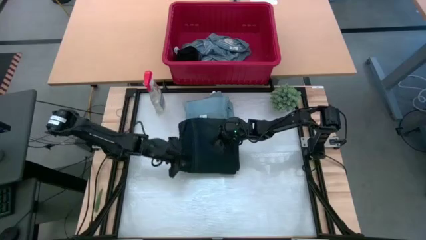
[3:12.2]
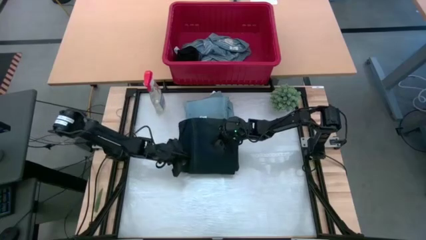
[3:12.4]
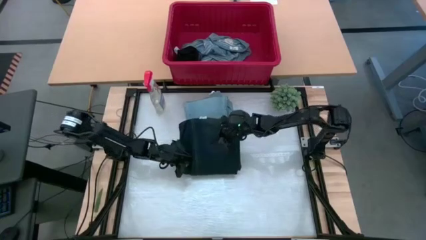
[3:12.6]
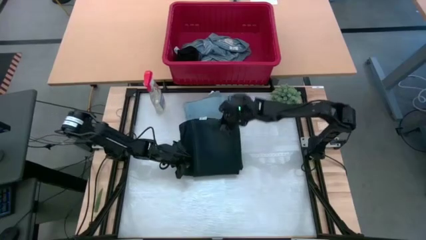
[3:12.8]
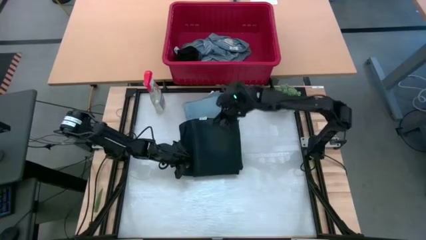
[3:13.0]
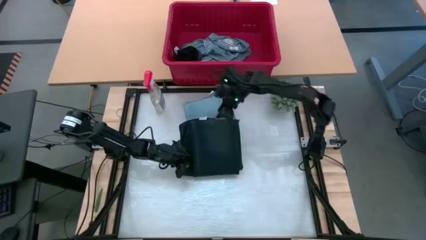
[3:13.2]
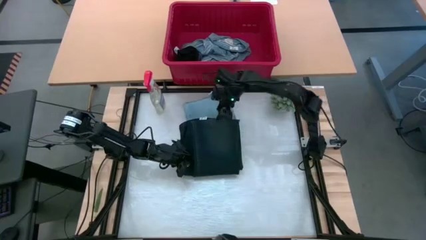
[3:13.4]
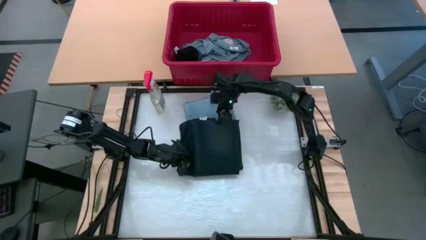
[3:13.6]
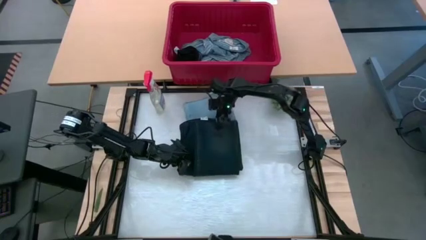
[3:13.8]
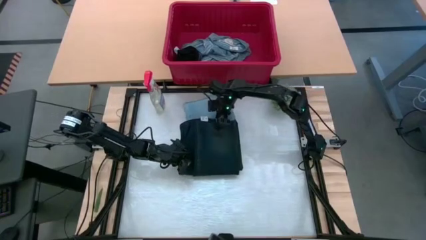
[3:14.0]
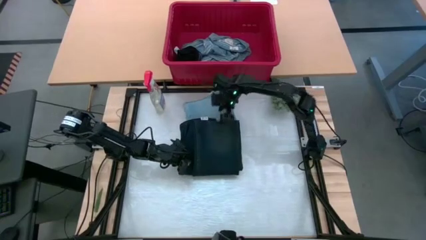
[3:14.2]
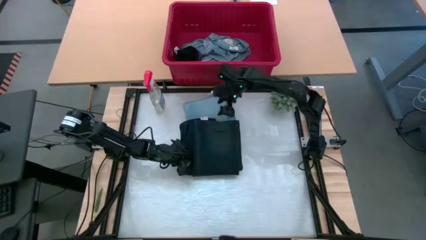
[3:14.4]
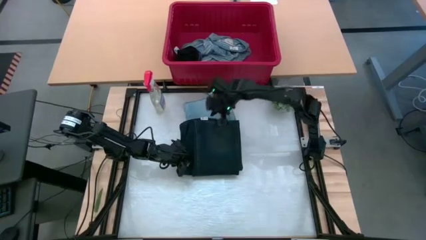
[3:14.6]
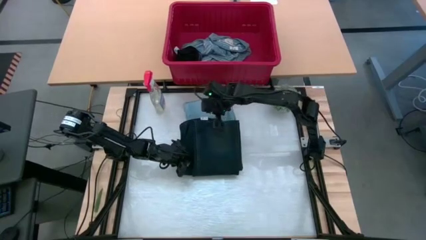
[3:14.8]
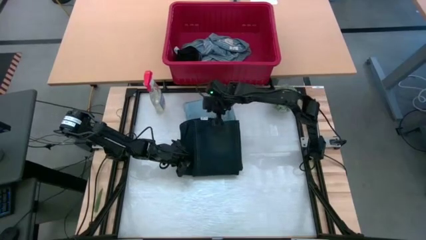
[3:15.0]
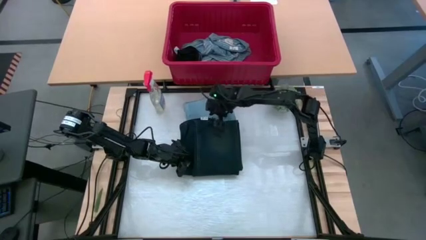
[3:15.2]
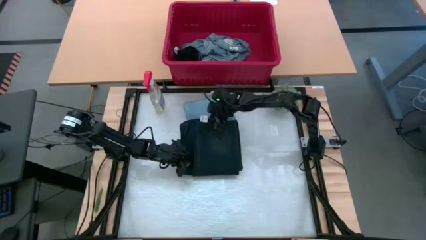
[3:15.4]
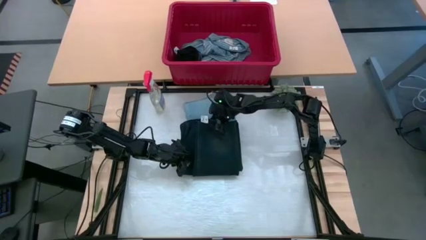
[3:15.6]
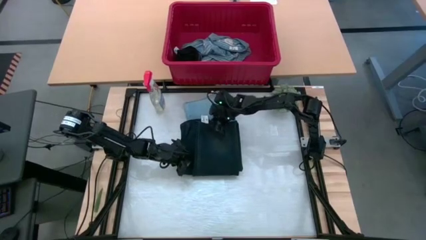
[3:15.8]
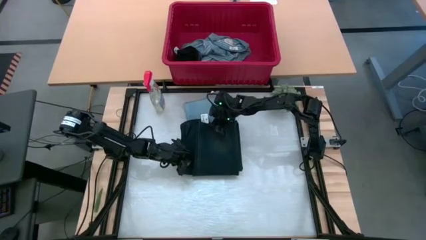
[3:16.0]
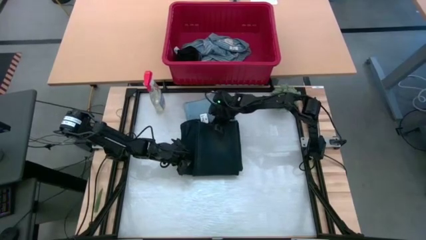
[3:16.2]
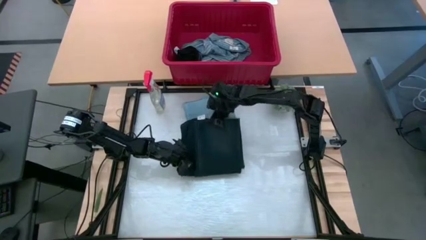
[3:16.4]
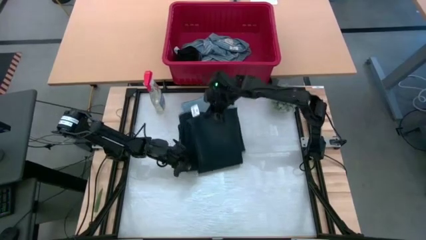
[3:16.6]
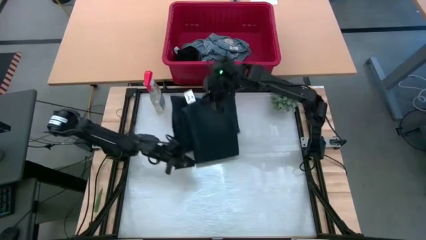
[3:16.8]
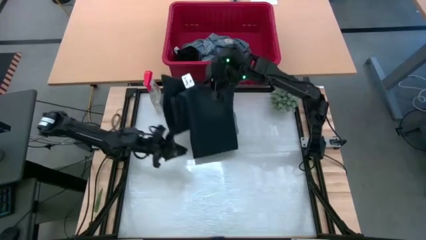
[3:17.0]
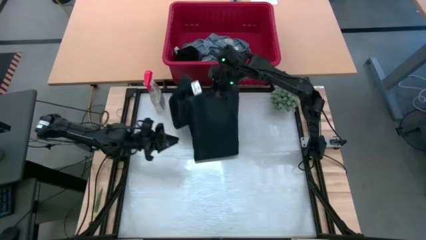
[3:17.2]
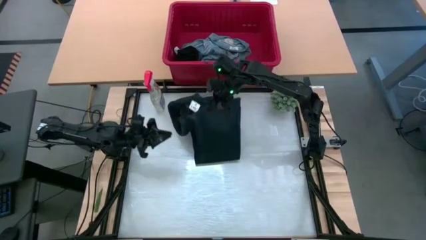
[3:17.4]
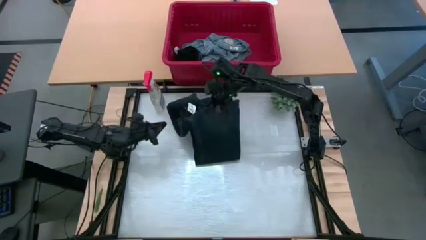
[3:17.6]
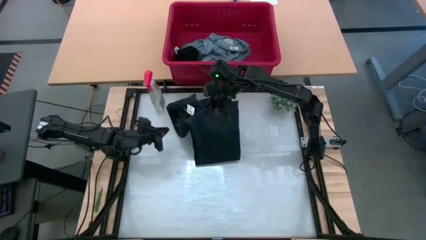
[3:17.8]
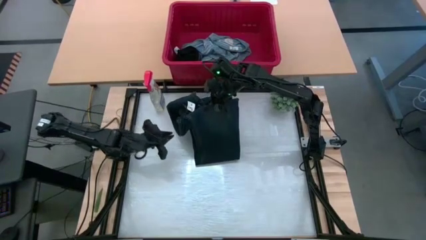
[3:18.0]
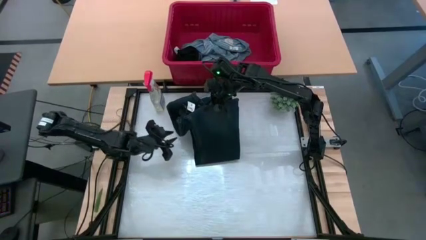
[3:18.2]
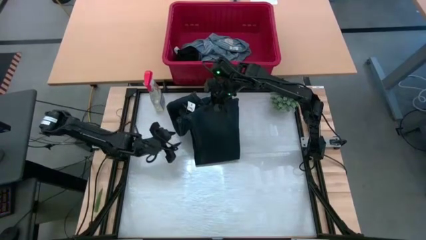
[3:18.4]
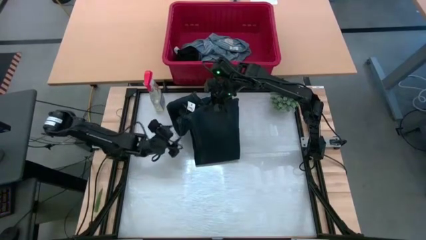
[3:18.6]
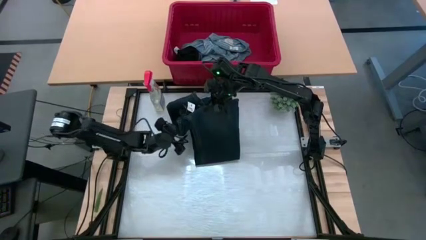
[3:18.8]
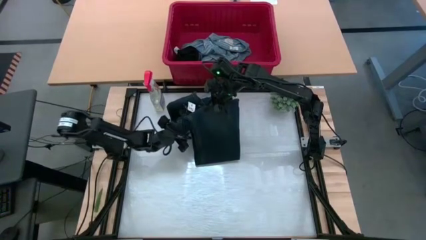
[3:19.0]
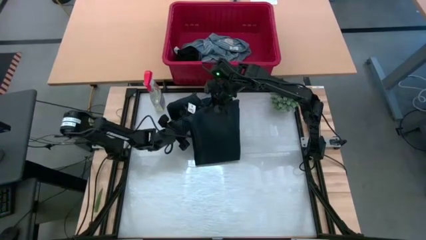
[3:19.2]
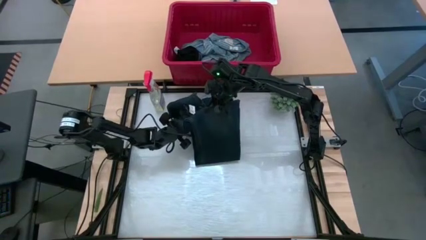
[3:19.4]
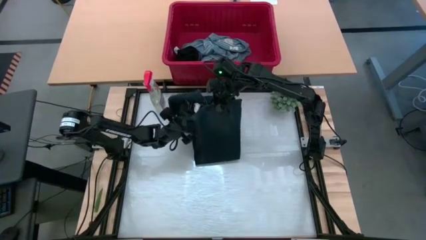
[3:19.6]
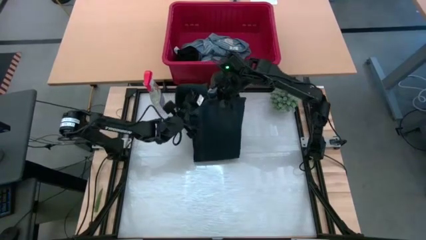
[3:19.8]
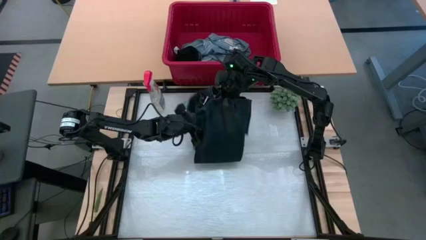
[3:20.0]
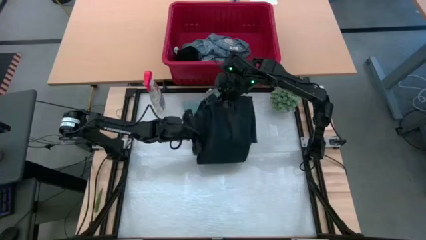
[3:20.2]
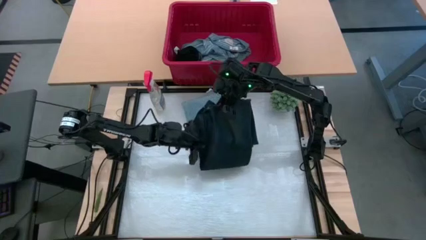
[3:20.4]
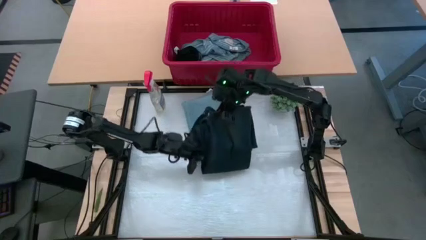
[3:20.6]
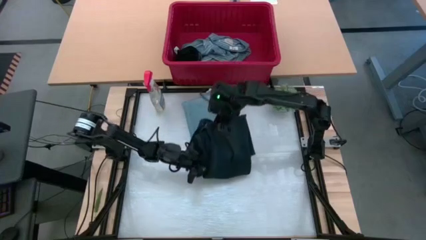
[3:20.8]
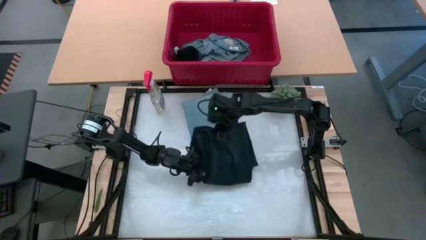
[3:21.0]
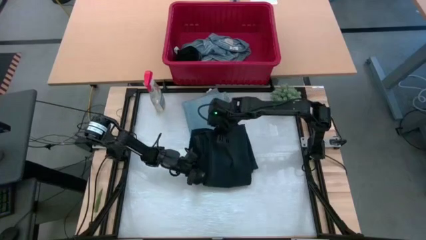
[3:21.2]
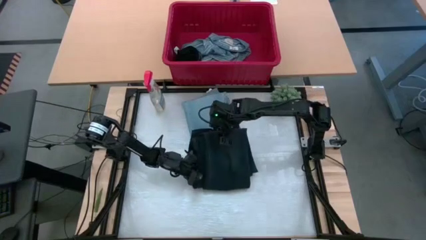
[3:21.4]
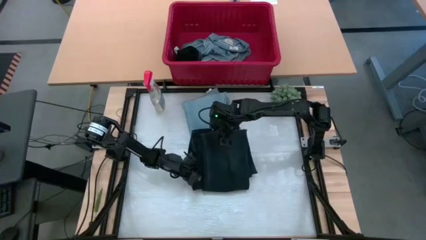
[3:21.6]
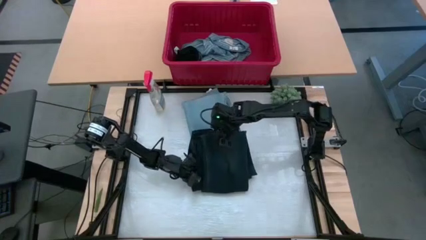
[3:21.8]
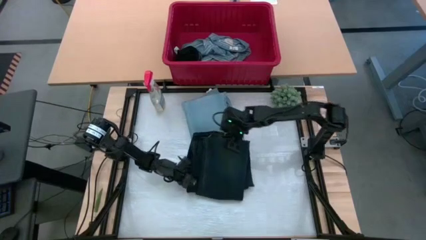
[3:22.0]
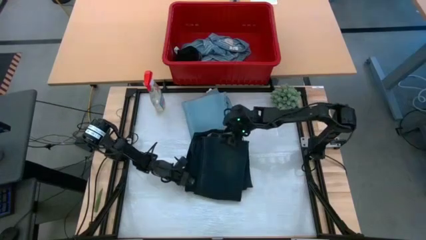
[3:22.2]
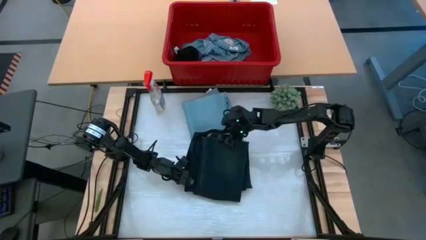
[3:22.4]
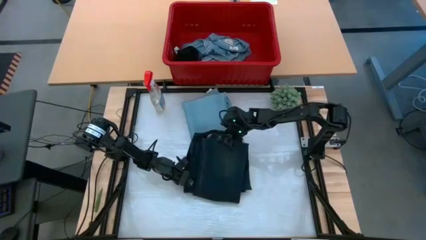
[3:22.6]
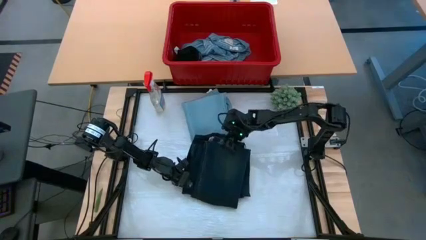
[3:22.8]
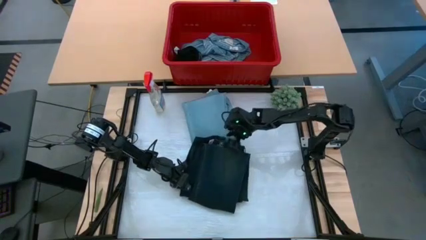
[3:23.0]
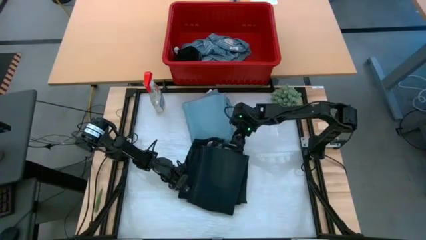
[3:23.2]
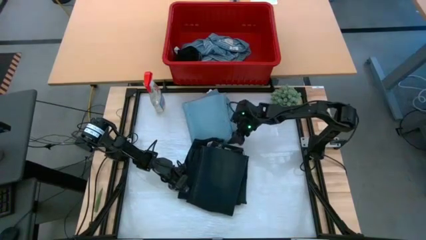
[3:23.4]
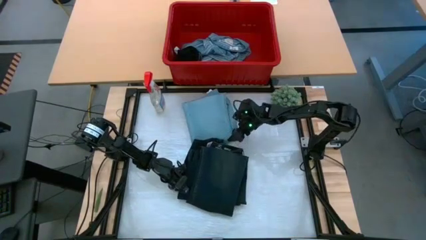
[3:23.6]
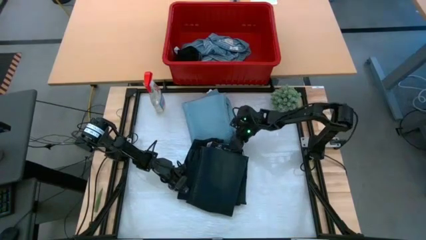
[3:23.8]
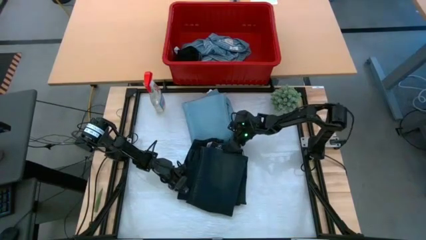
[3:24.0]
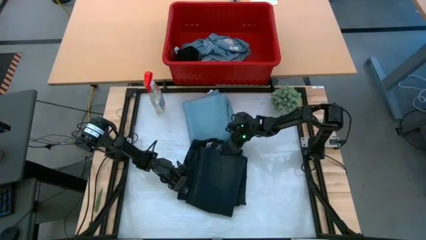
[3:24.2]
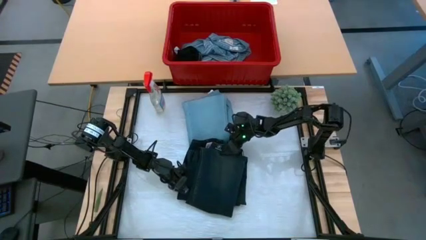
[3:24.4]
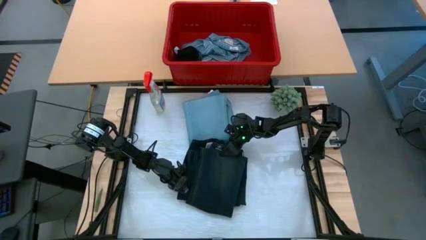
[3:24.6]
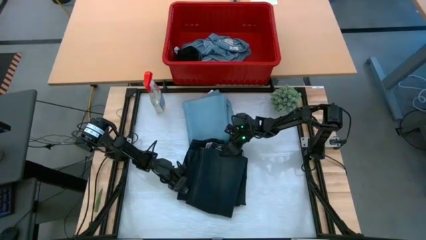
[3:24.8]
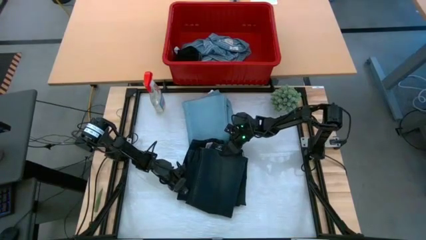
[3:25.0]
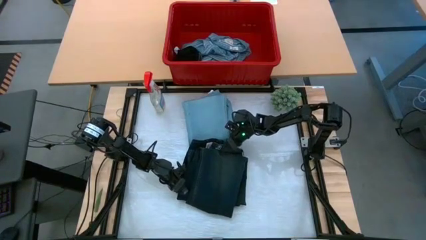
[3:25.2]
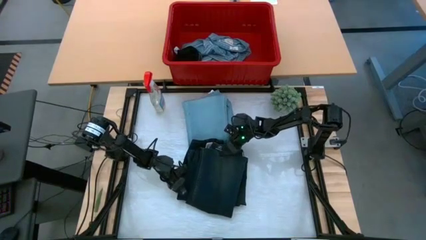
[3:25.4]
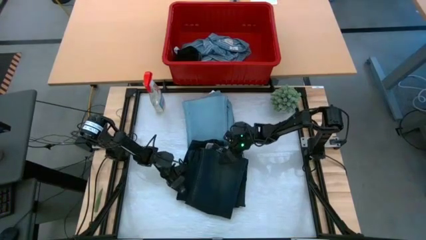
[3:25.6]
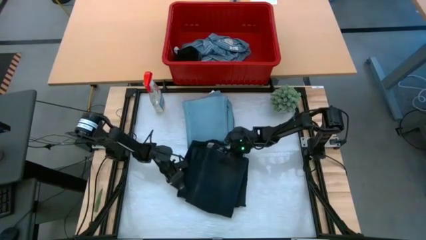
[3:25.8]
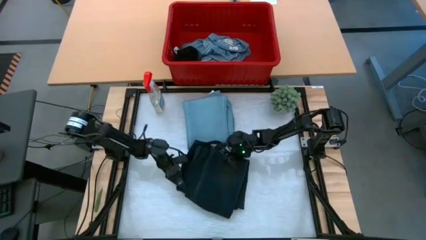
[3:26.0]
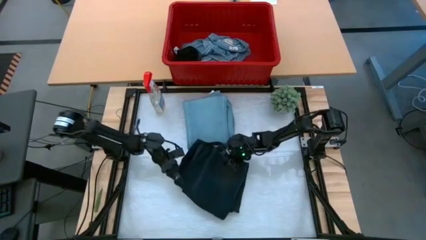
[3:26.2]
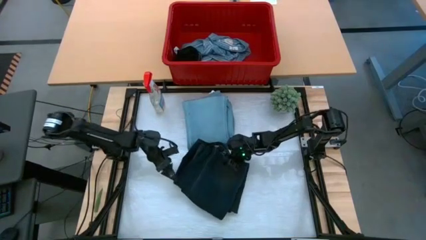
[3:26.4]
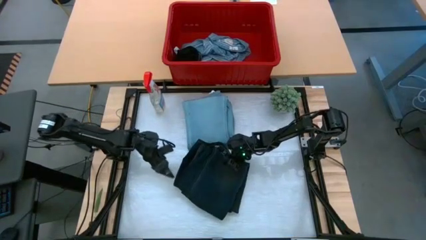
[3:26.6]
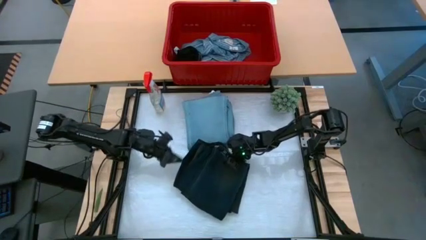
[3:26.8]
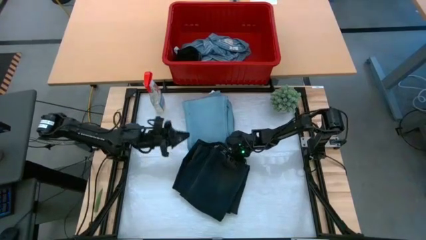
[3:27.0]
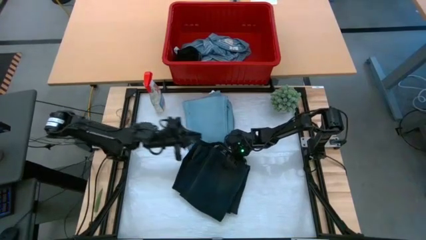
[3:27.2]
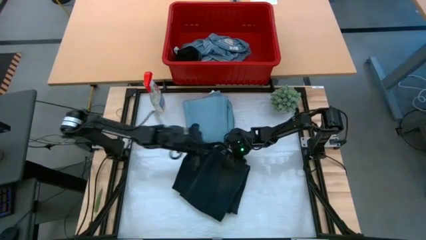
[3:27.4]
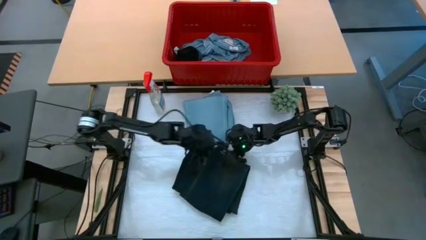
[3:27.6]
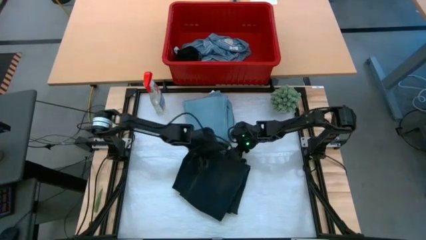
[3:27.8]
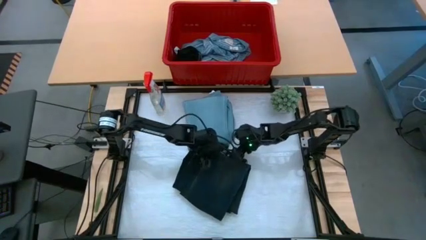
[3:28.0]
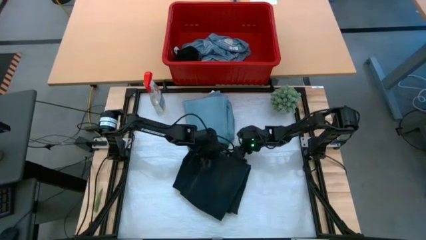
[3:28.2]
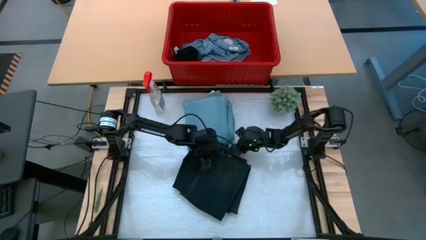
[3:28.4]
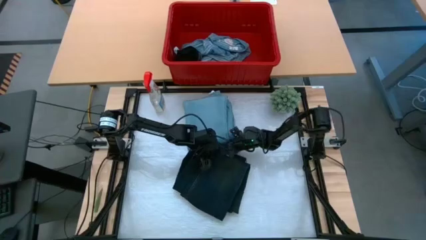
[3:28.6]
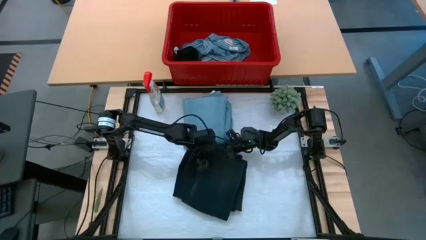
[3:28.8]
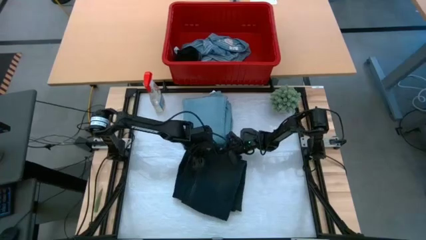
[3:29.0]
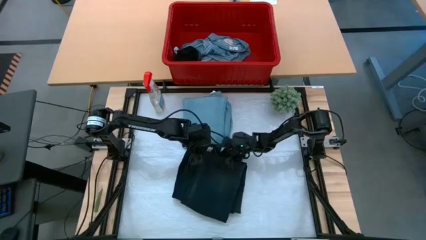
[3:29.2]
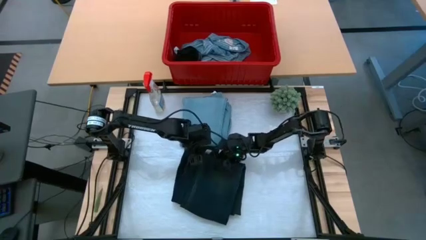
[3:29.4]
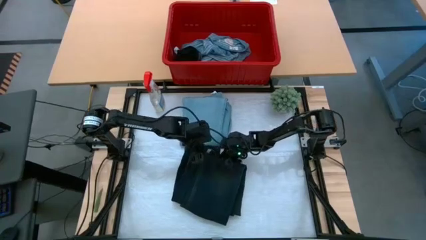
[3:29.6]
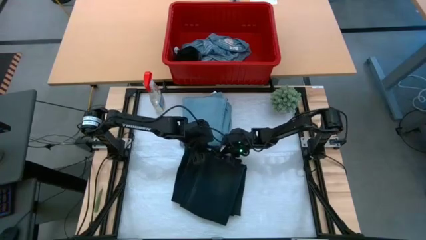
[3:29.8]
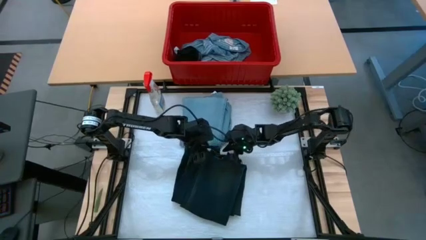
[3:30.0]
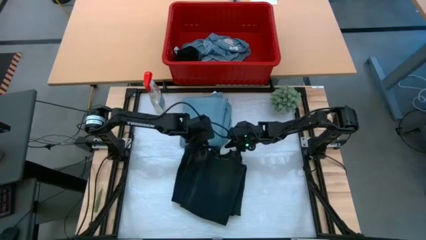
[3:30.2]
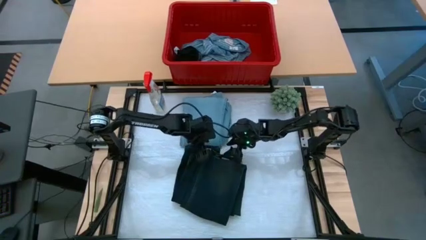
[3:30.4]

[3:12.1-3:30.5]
Task: Fold Laundry from Bin
Fold the black pants from the red laundry bin
